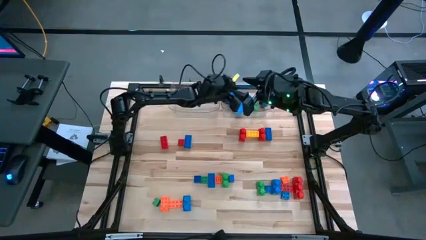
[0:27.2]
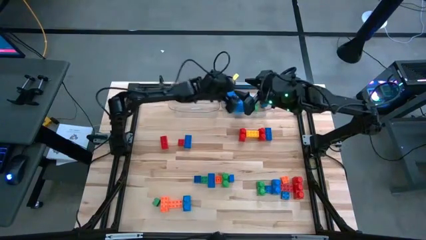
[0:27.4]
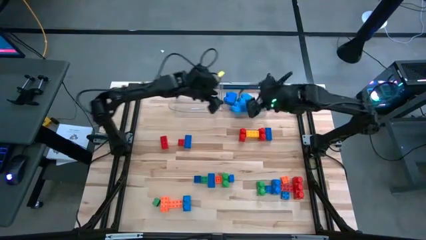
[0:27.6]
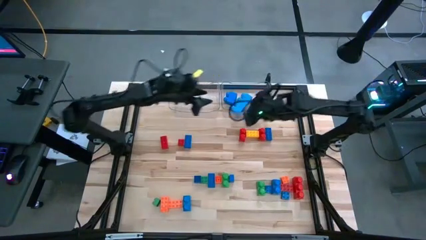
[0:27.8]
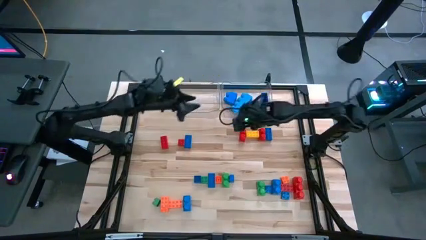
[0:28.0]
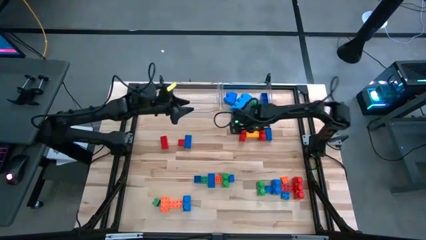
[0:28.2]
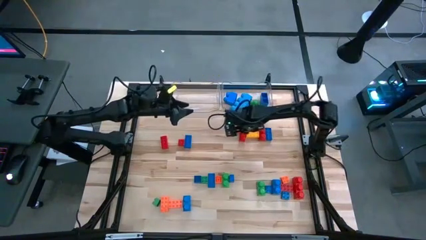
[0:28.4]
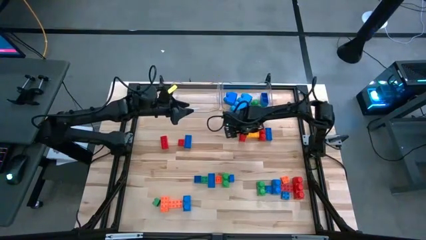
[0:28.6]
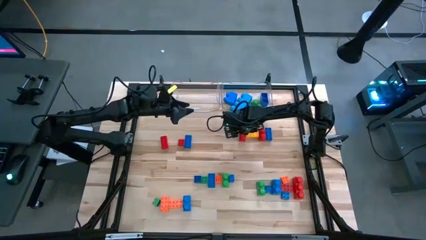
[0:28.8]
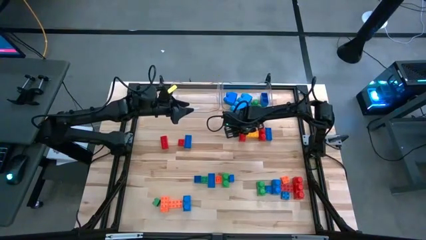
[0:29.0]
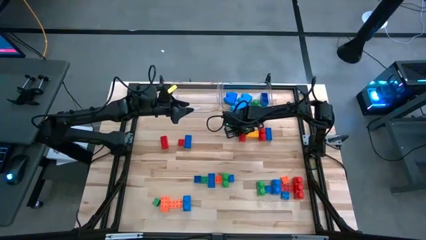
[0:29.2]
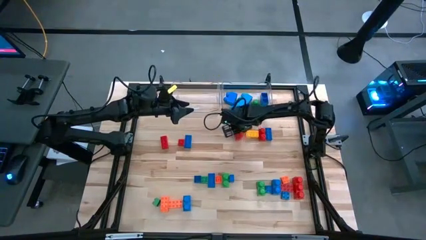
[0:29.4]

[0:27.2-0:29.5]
Task: Sort blocks by size
Put the red lego piece into the right transparent bin

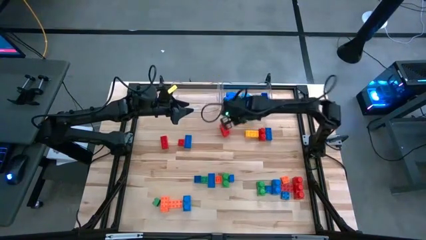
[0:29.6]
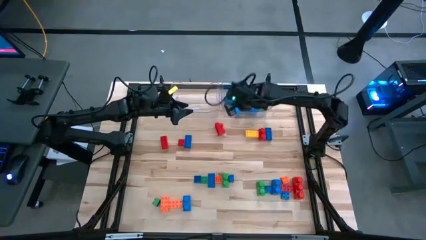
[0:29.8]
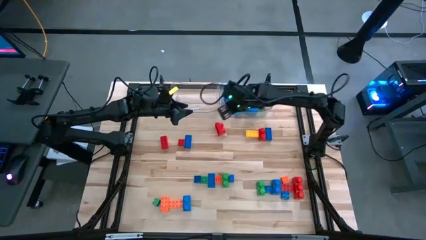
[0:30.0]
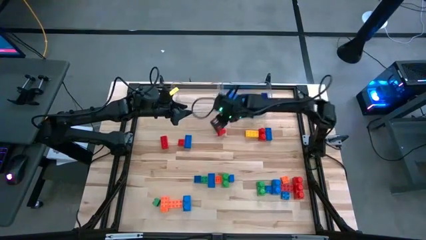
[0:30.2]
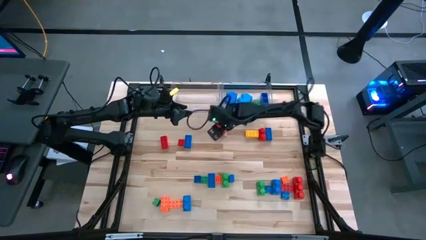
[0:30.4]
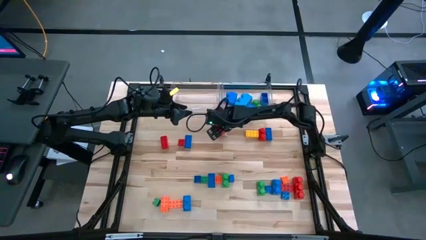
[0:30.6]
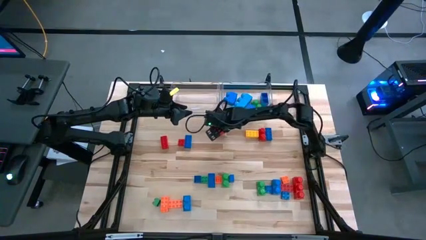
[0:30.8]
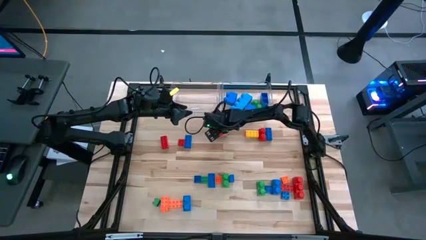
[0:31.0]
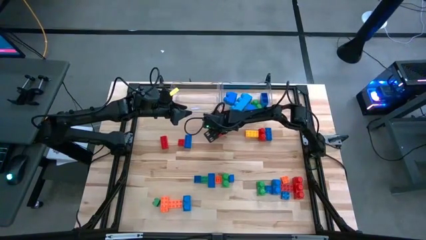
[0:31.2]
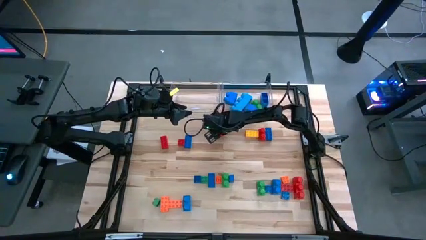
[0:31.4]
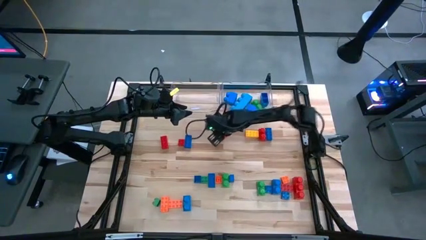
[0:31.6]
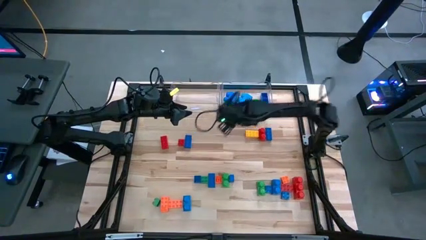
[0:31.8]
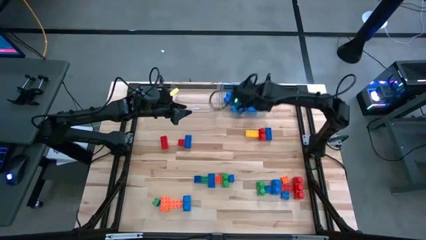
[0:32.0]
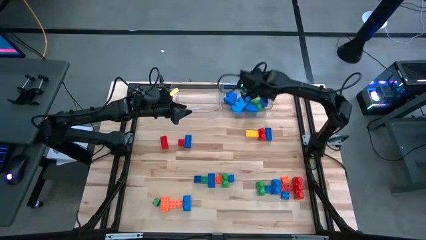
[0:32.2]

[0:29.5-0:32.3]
Put the red lego piece into the right transparent bin

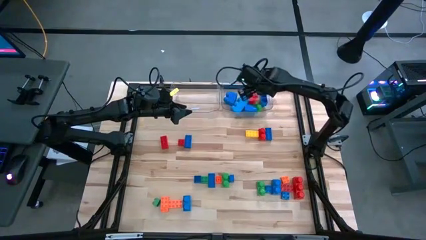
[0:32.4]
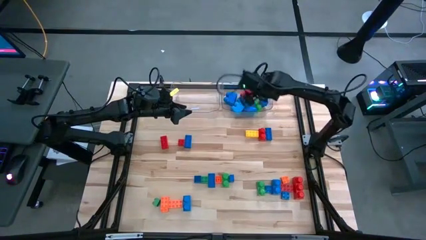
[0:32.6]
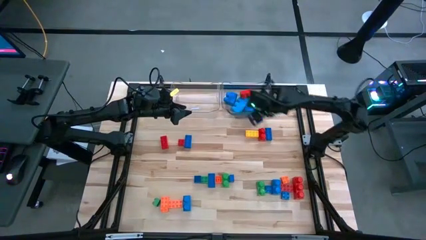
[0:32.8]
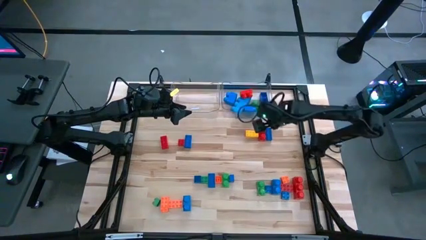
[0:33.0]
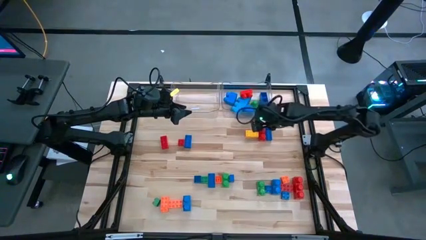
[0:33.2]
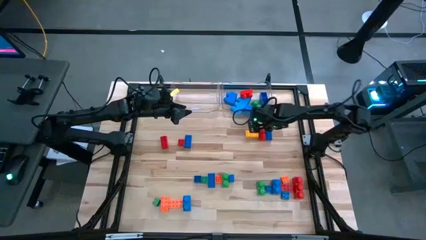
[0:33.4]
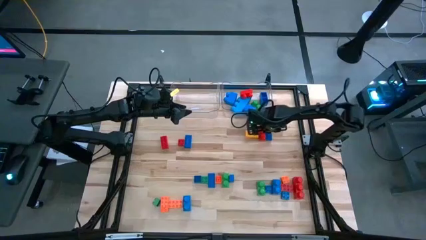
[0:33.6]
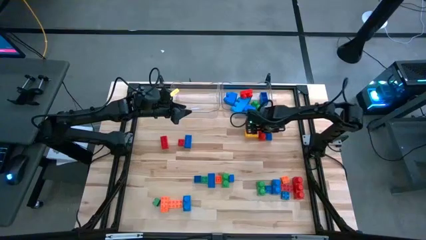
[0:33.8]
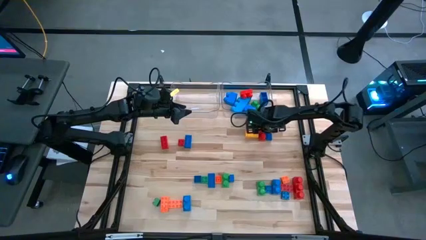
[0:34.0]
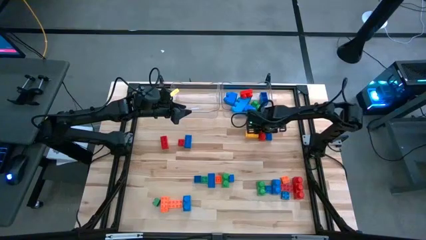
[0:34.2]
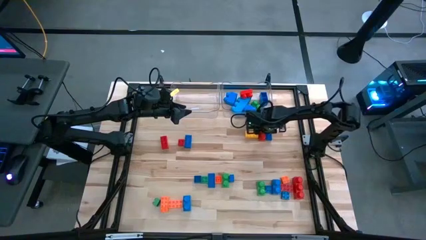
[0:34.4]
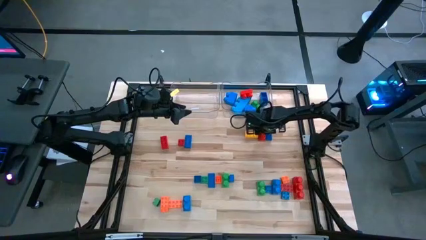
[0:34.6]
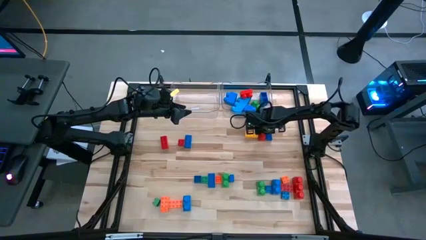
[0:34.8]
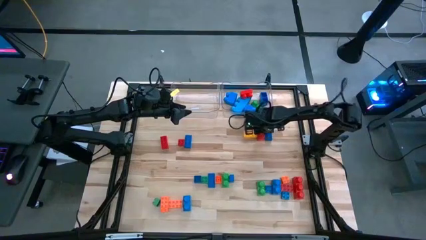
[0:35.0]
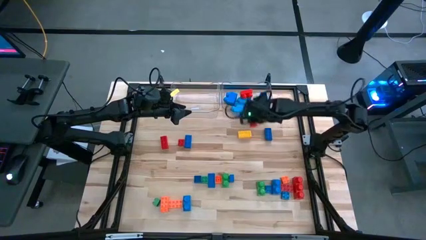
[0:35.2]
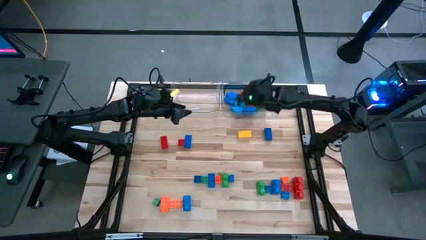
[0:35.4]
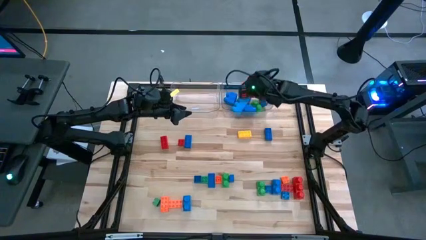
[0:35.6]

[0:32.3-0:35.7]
Put the top right red lego piece into the right transparent bin

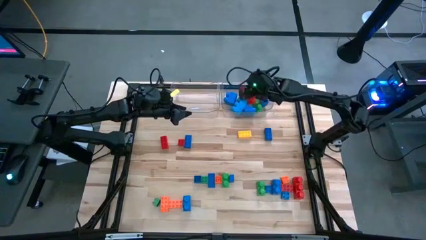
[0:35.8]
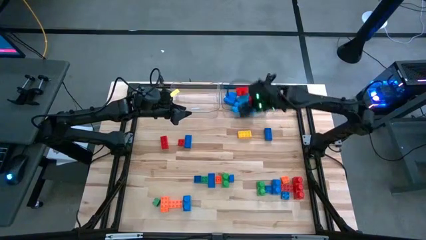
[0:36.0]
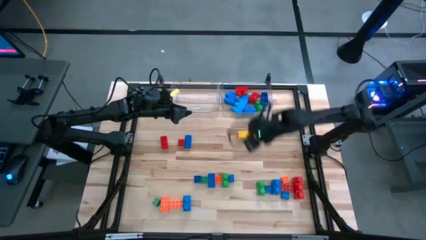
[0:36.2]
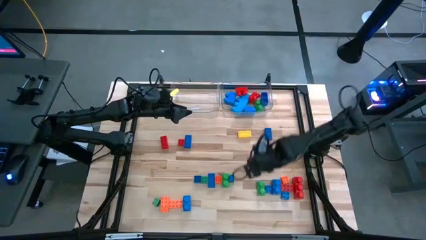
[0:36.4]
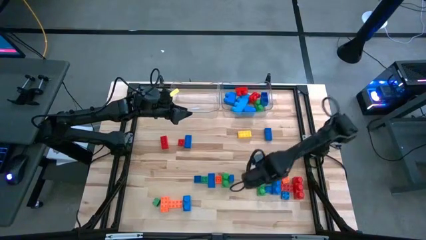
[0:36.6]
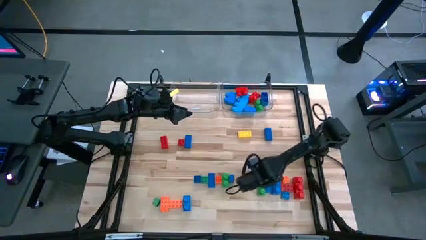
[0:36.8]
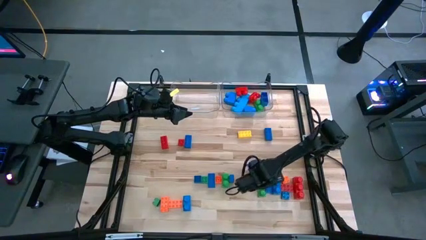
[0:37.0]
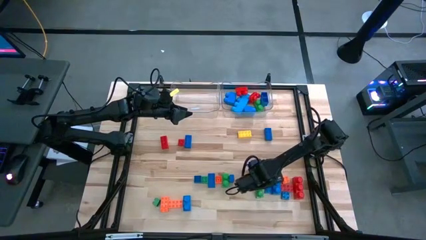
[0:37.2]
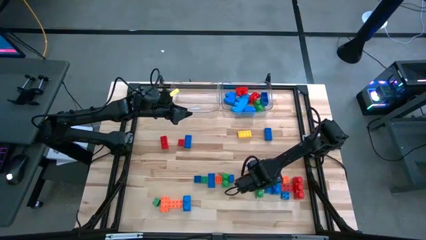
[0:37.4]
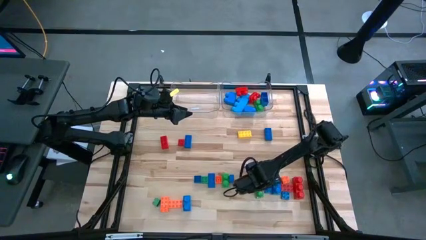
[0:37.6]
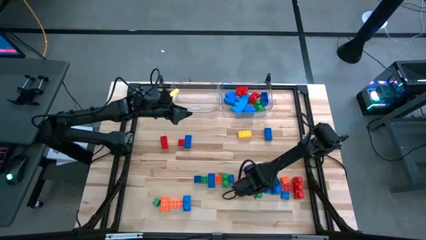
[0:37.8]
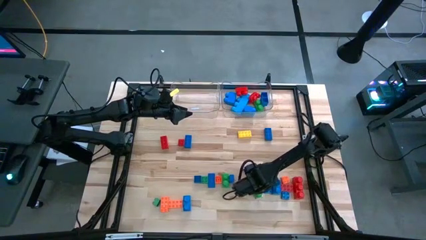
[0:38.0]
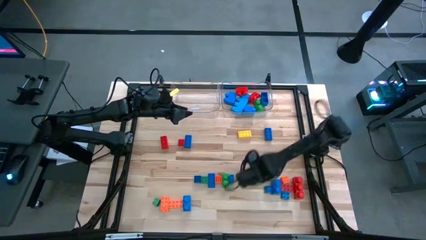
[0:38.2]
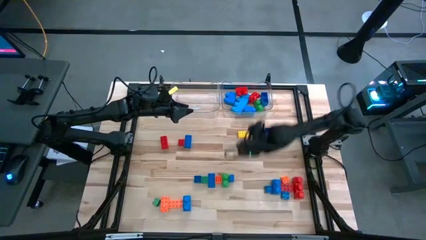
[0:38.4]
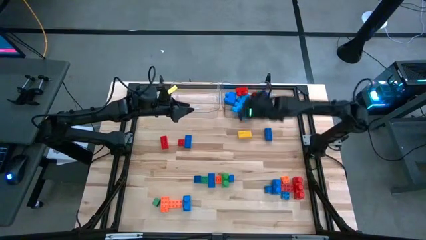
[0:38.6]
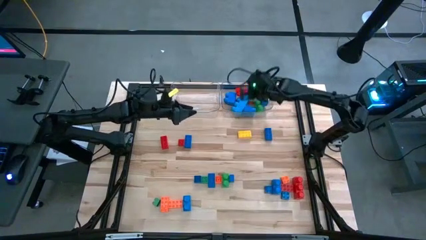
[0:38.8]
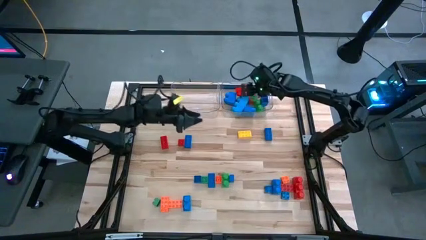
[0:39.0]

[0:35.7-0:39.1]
Put the bottom right green lego piece into the right transparent bin

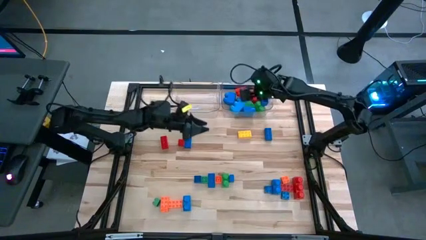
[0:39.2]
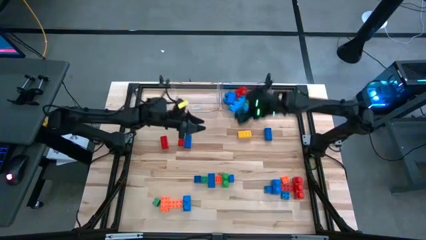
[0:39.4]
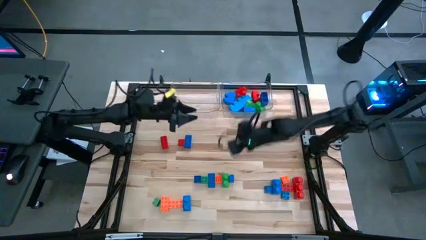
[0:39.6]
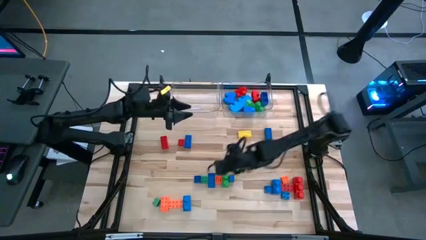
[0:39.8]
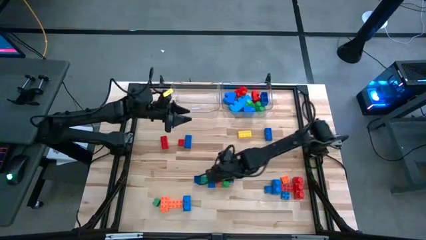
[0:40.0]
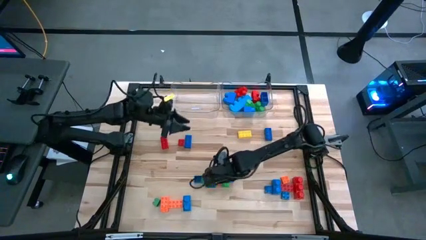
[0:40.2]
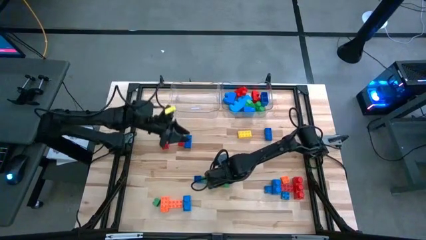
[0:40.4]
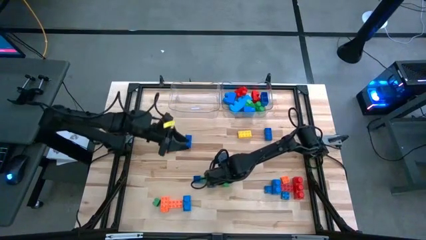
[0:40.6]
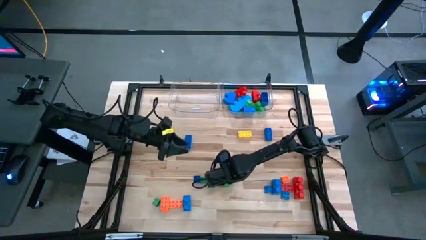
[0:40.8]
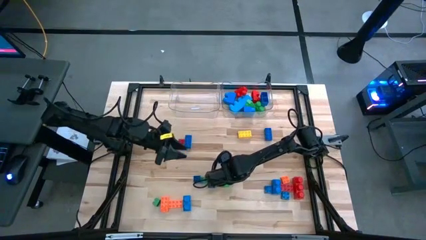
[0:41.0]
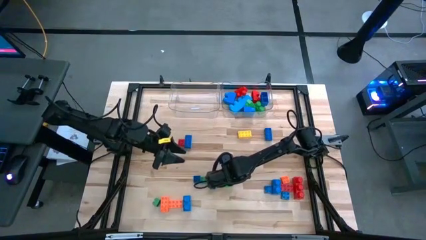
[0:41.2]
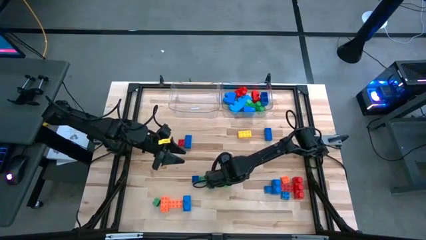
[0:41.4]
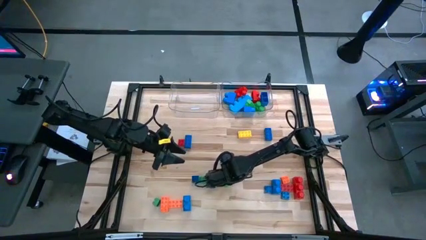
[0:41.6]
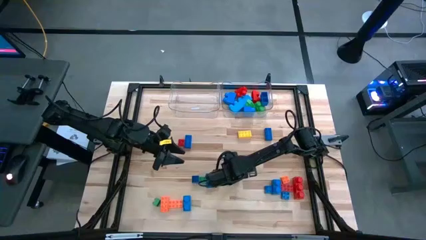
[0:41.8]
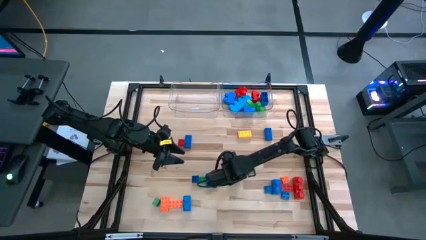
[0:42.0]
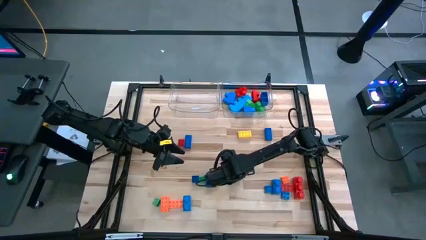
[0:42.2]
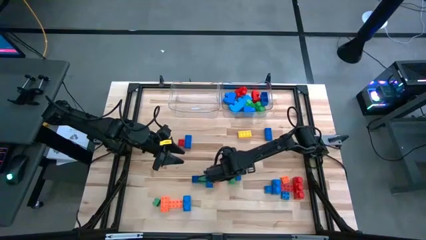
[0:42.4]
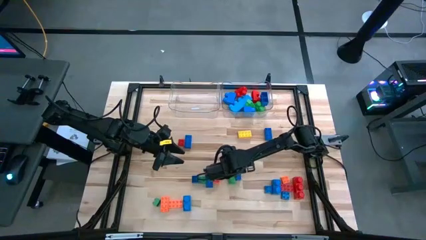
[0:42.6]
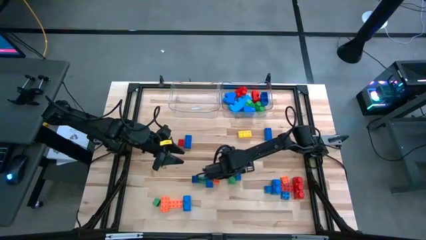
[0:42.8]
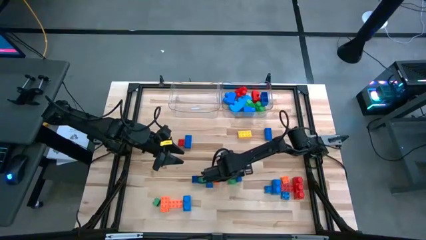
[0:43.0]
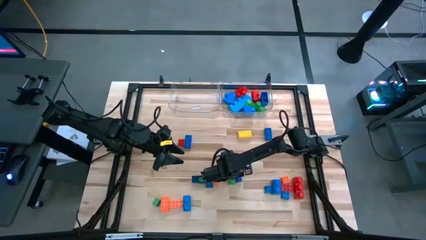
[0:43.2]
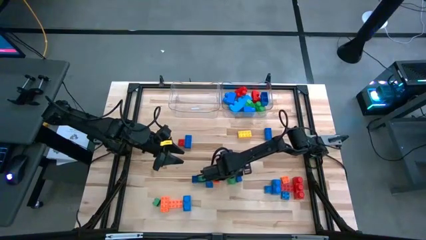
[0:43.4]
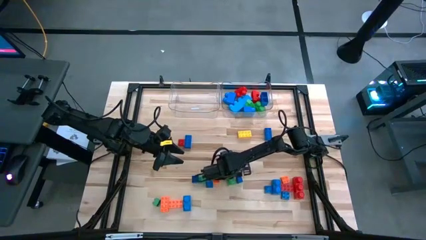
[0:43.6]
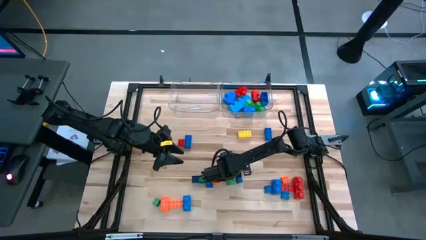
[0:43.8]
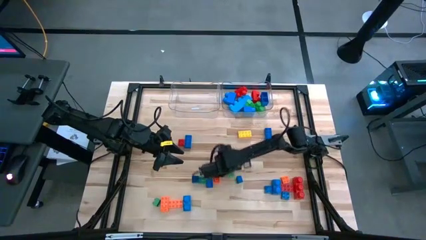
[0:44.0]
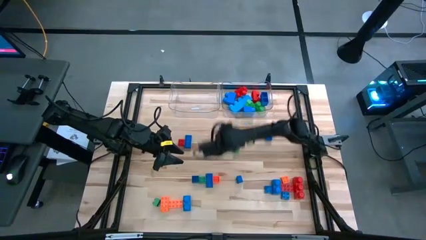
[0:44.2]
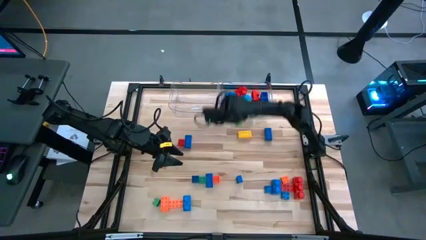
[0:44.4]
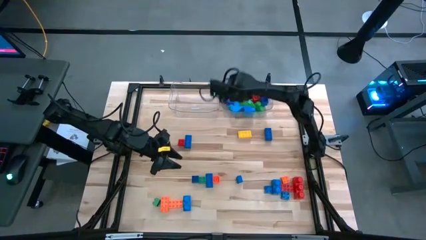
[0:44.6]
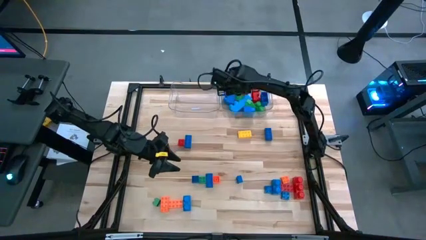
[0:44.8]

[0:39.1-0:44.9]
Put the green lego piece into the right transparent bin
